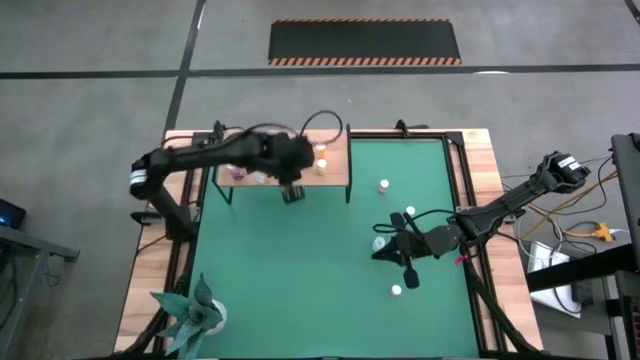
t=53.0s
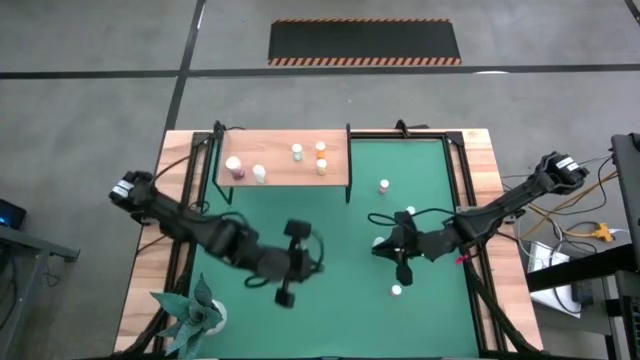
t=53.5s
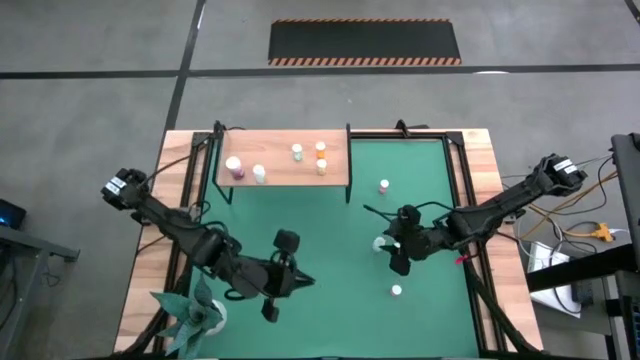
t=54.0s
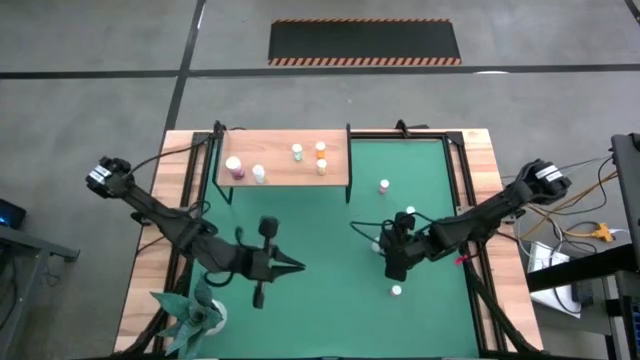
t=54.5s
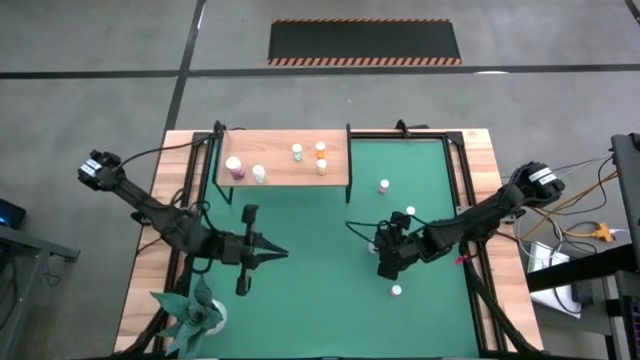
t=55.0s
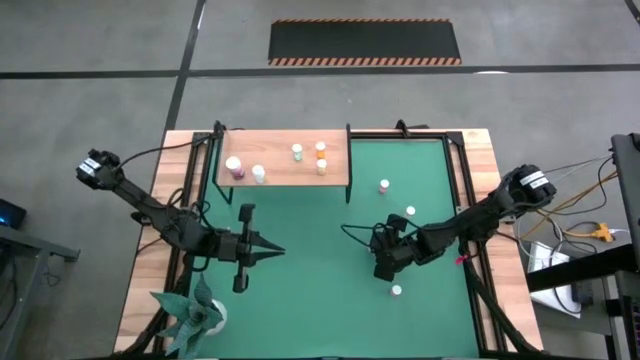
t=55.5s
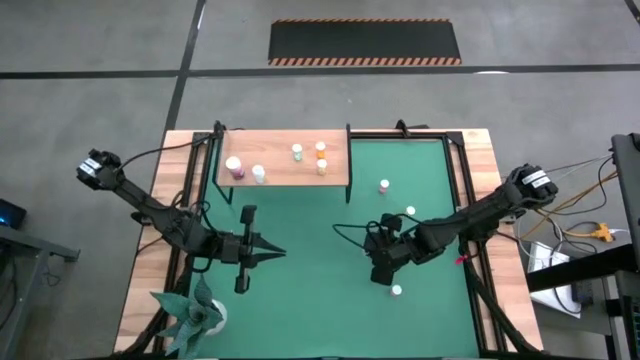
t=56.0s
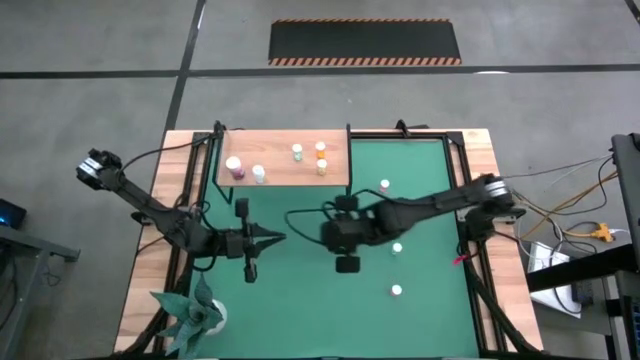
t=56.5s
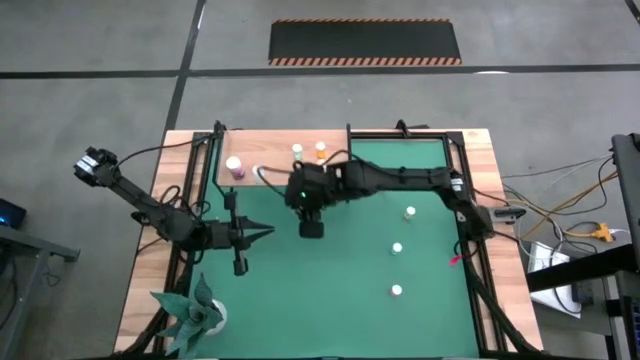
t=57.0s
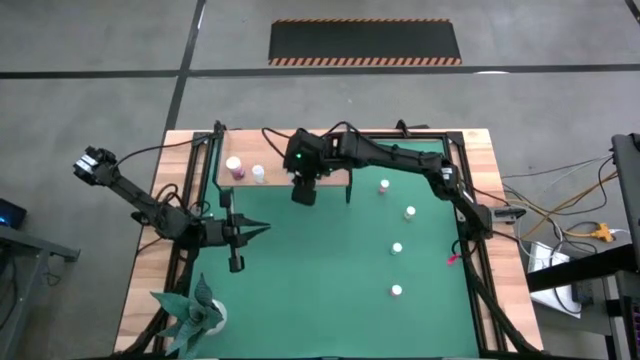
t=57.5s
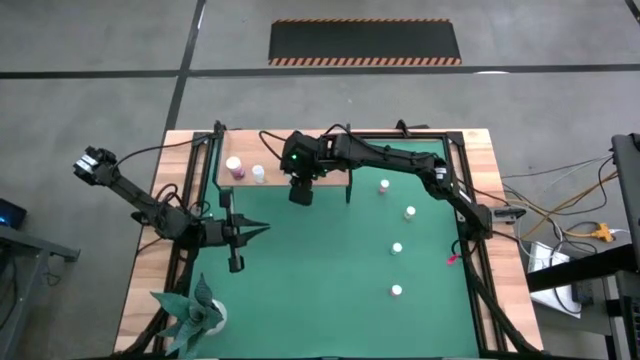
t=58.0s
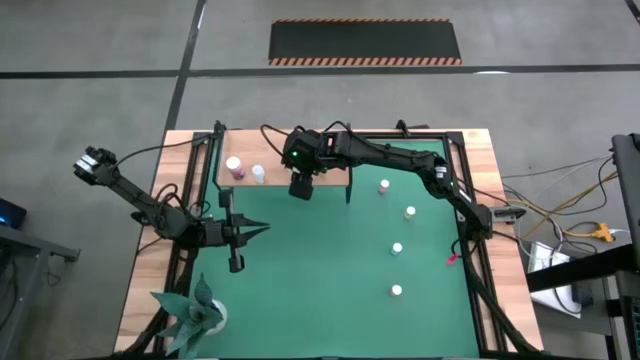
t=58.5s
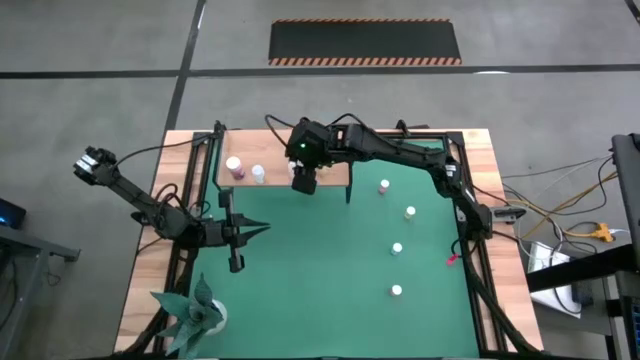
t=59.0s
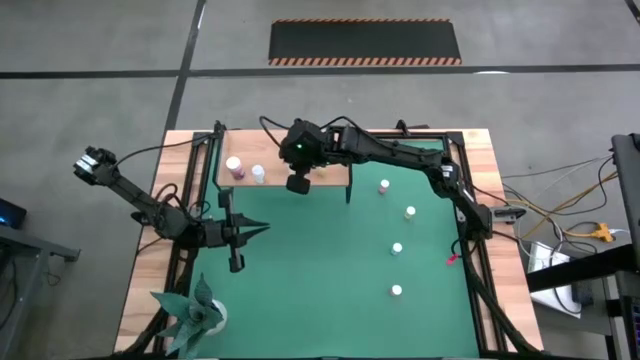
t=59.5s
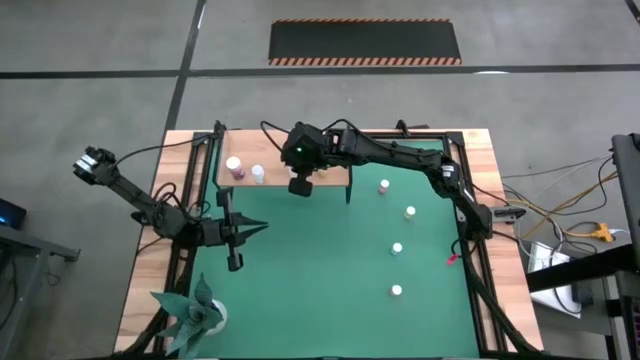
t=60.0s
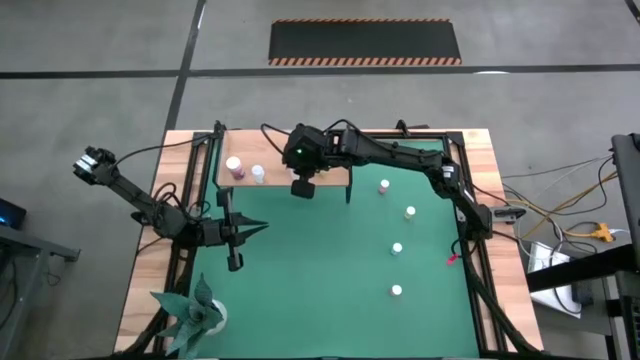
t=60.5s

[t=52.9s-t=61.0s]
Task: Pick and place medicine bottles onto shelf by color
Put the white pill bottle on the shelf

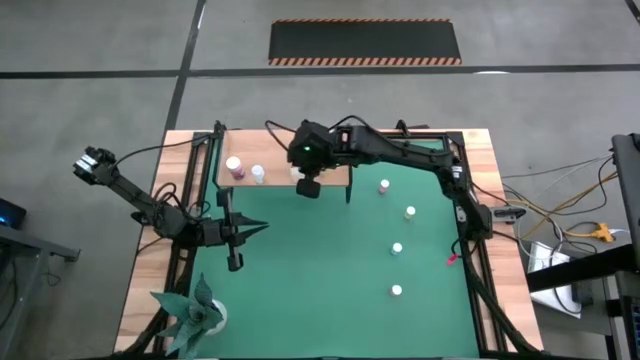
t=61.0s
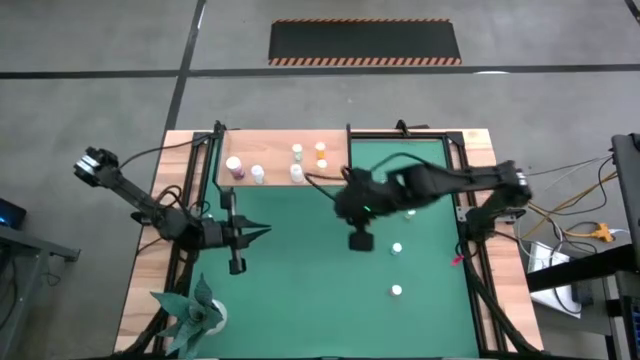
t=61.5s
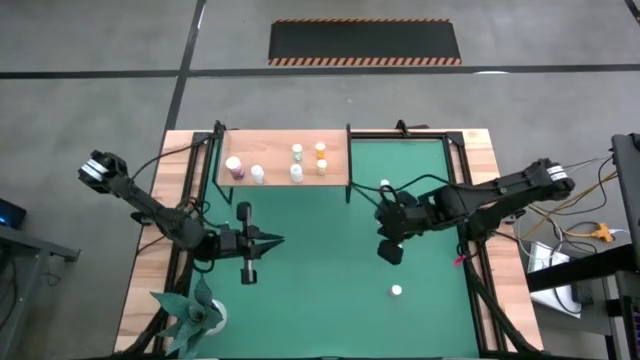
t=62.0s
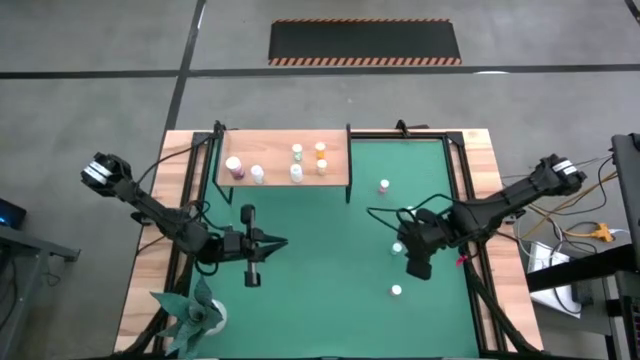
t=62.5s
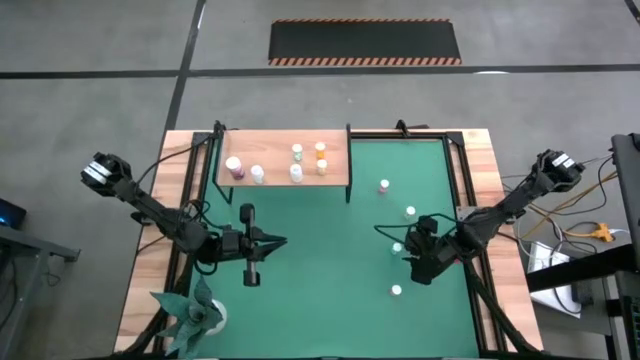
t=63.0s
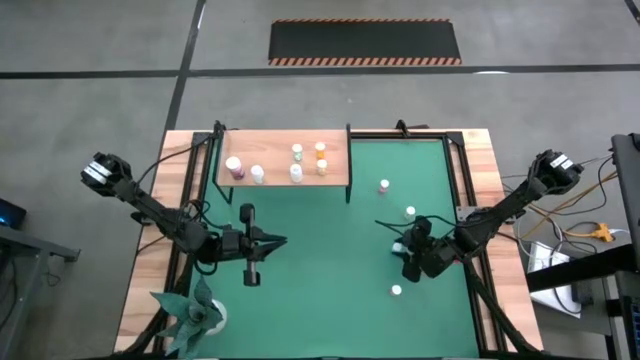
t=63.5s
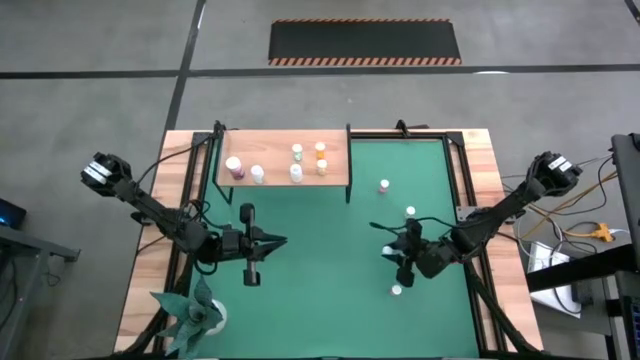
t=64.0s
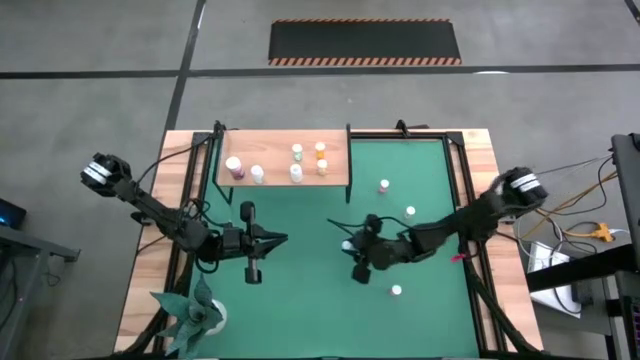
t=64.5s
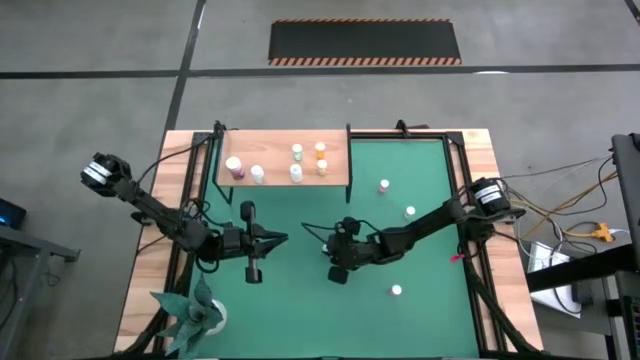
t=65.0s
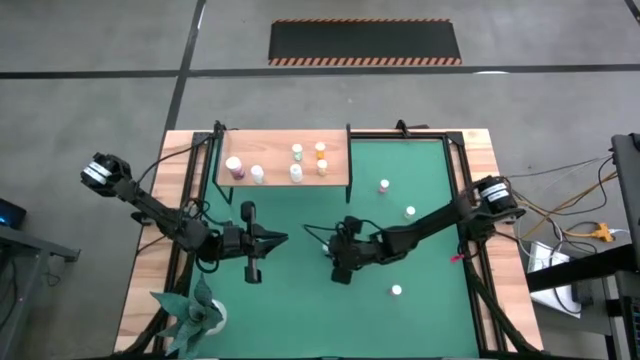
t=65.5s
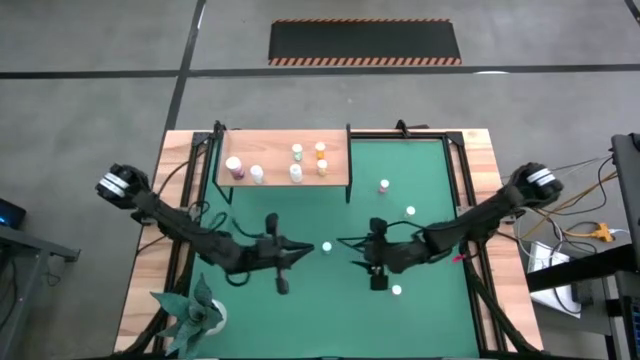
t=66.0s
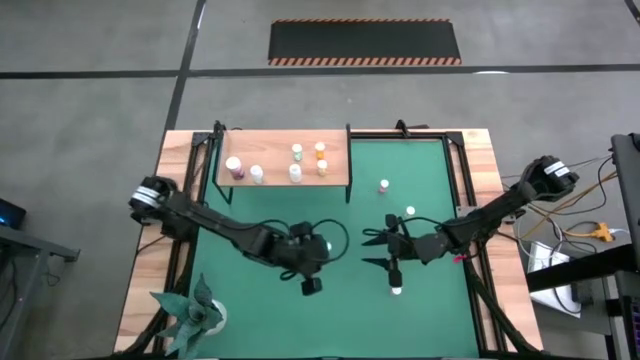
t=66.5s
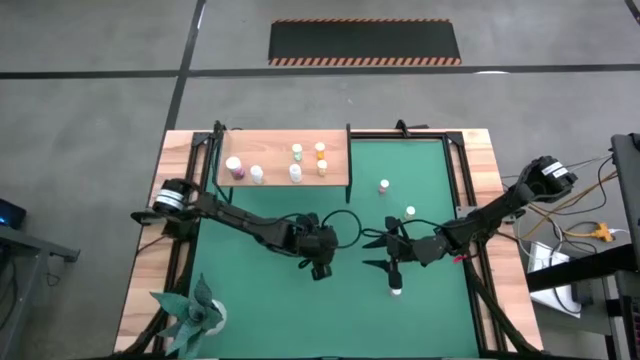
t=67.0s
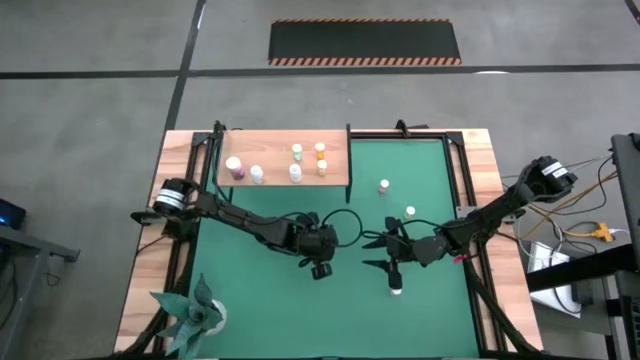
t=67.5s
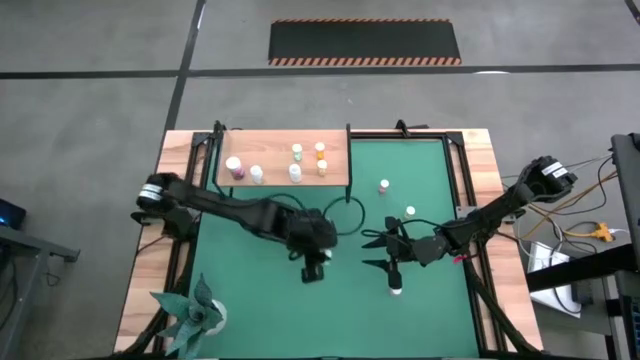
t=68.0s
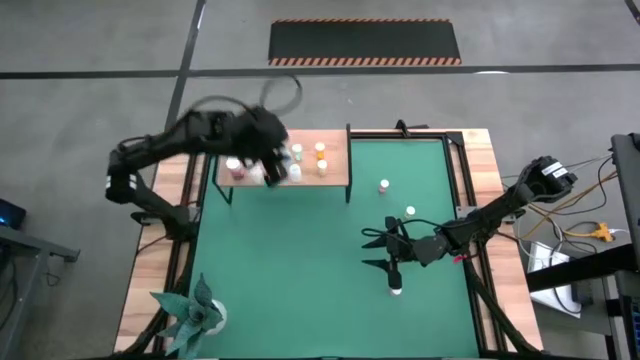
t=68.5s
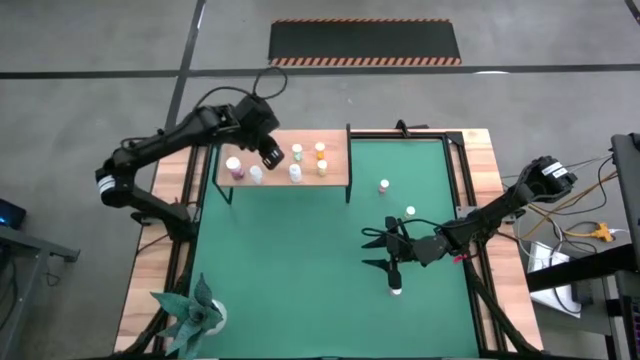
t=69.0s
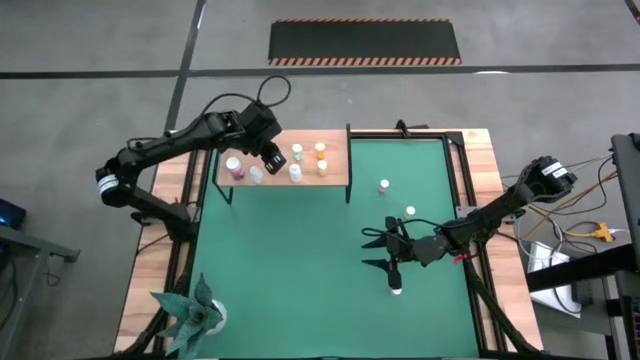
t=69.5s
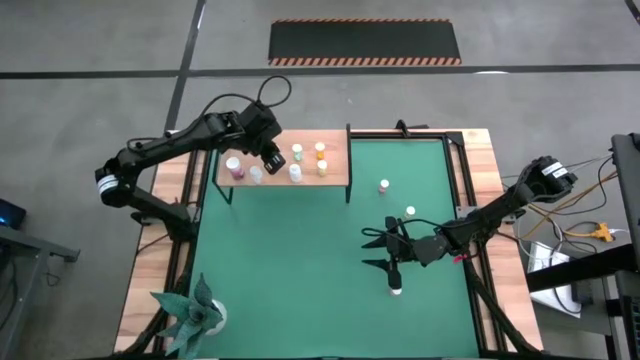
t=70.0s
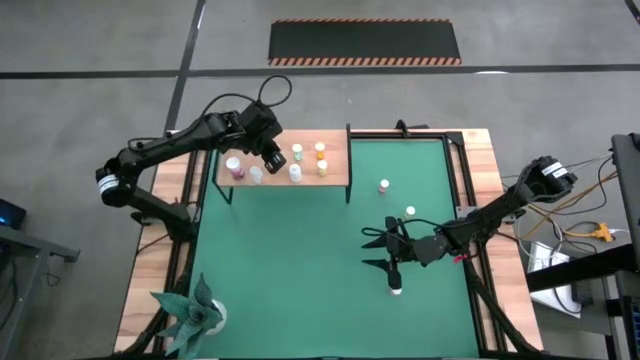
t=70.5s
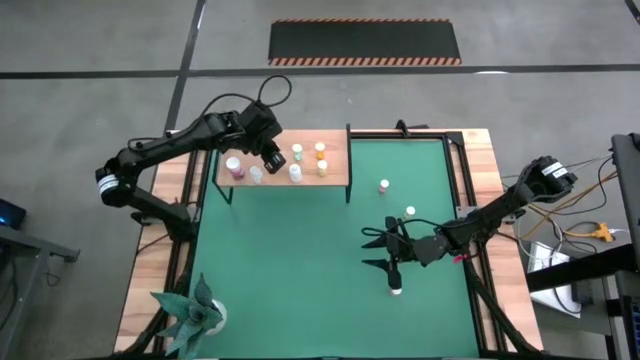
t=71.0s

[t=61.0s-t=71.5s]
Put the blue pill bottle on the shelf

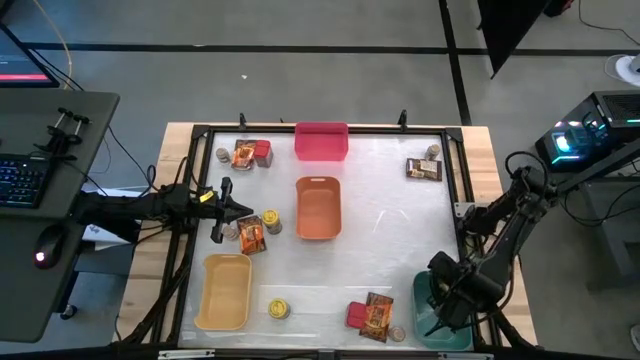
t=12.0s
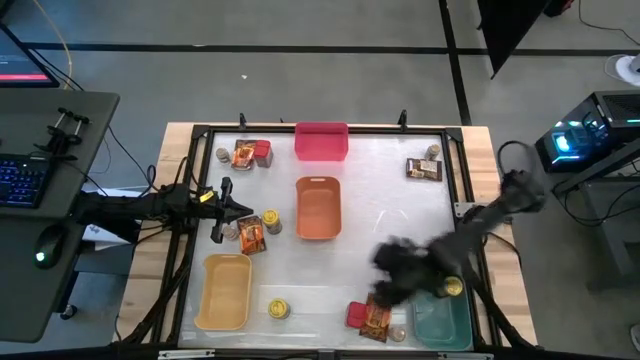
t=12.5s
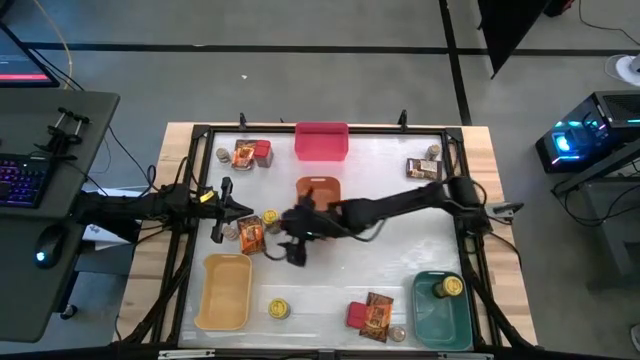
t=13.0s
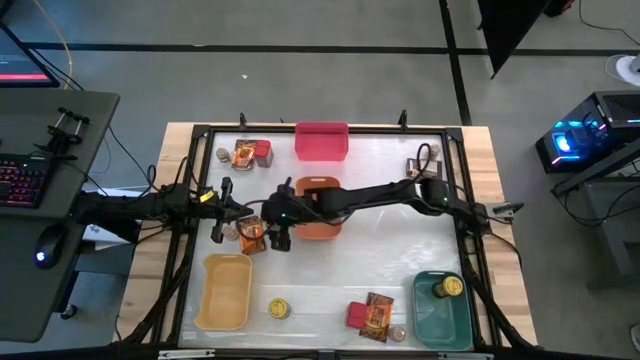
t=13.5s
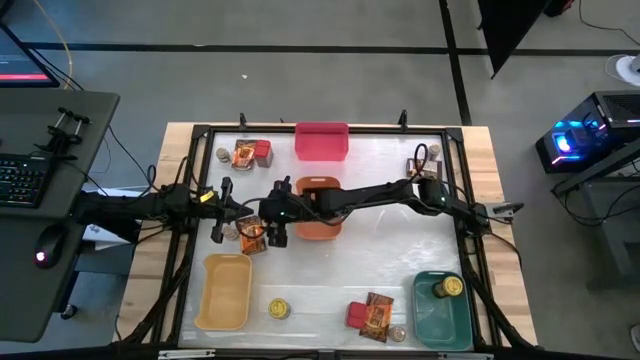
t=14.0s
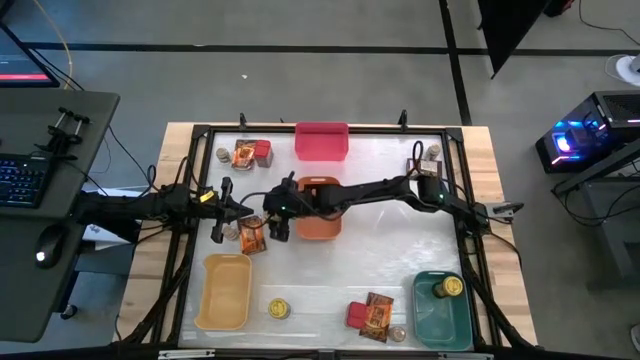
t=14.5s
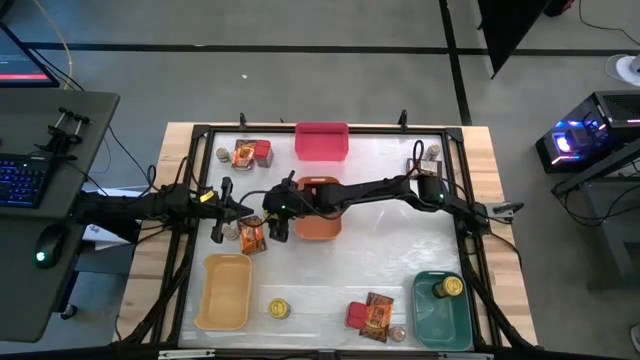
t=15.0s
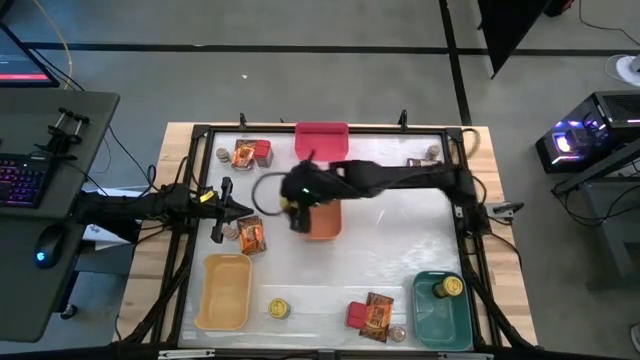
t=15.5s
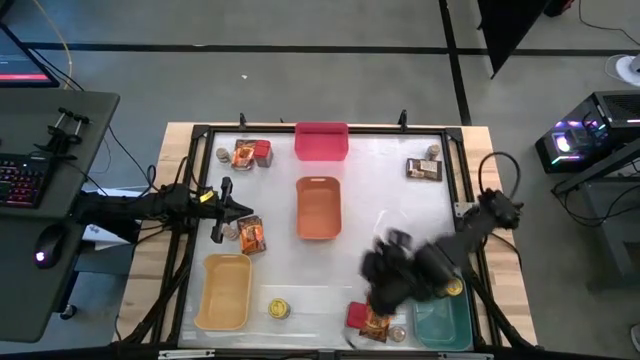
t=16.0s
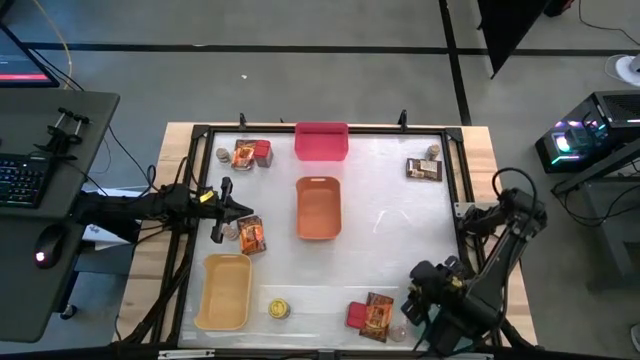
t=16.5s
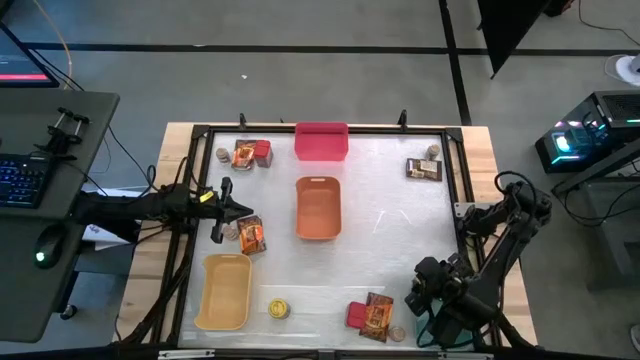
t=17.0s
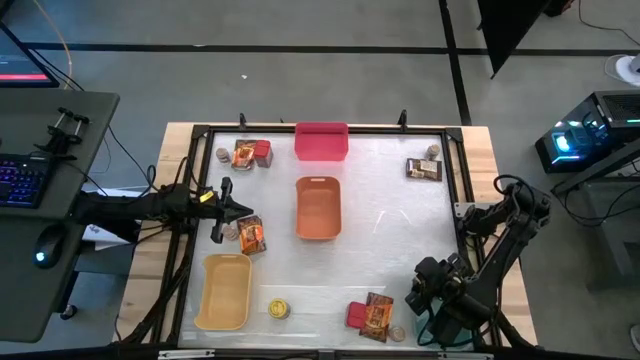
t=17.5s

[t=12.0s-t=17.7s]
Task: Sort spices by type
Put the top yellow spice bottle into the green bin
